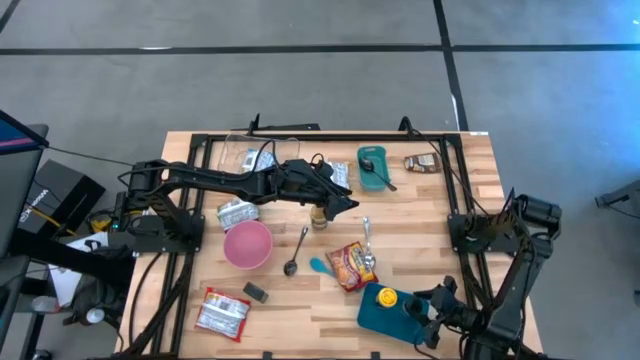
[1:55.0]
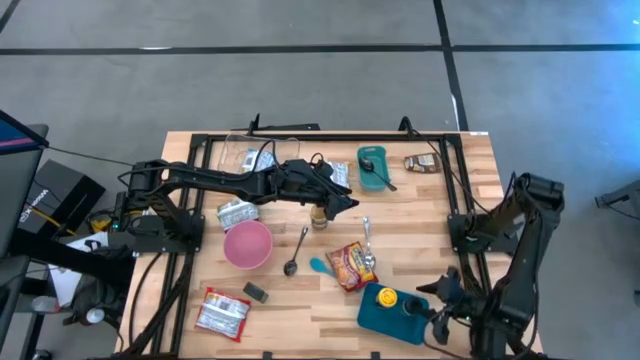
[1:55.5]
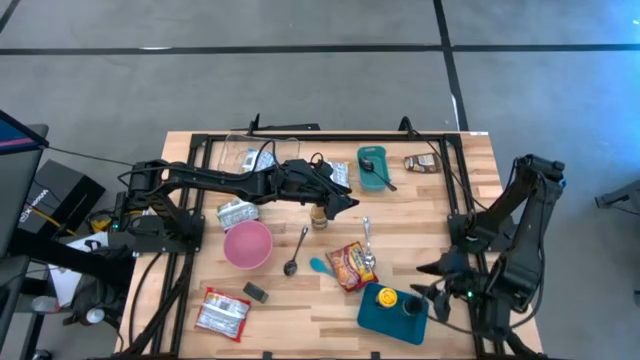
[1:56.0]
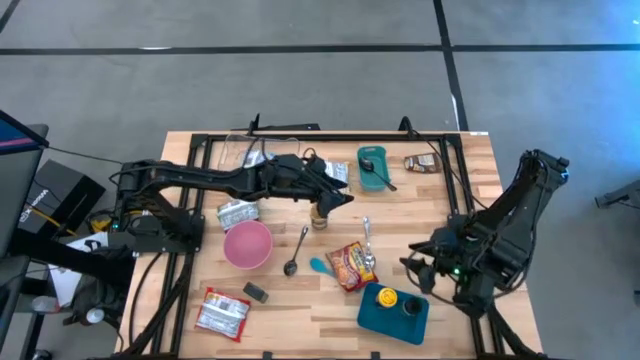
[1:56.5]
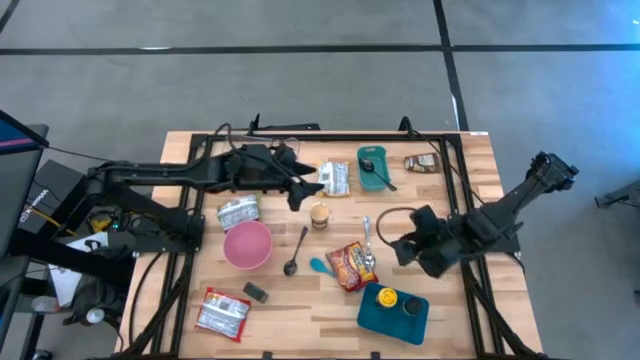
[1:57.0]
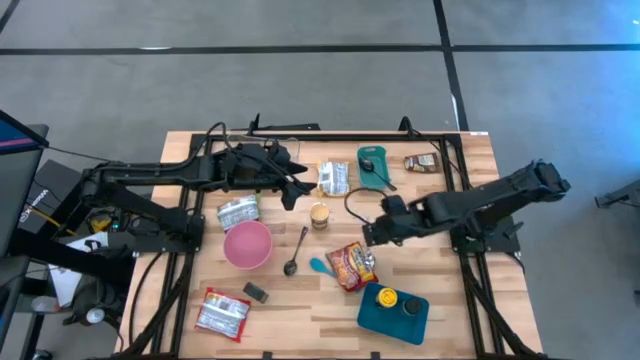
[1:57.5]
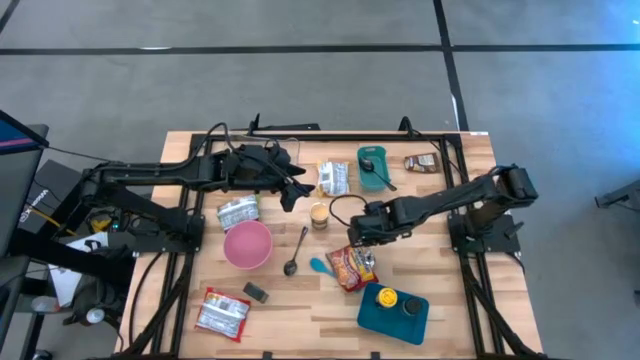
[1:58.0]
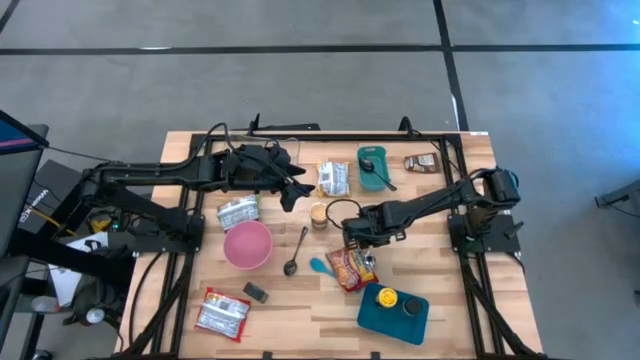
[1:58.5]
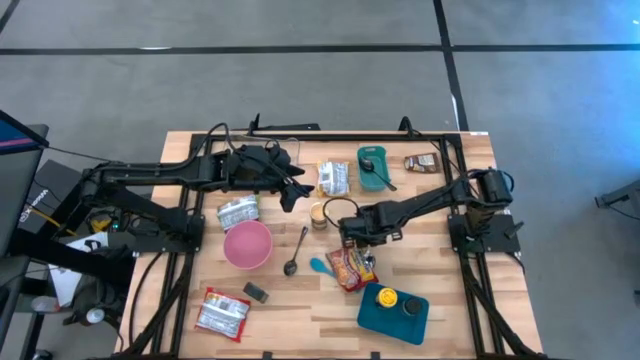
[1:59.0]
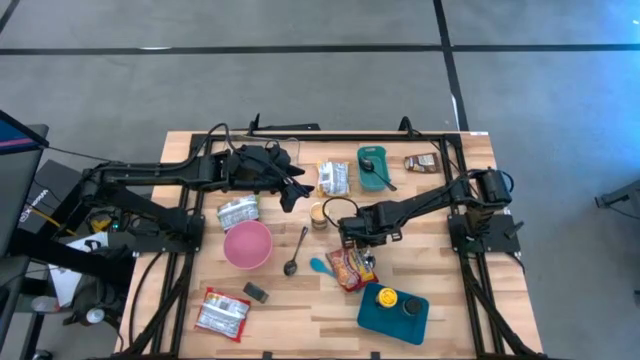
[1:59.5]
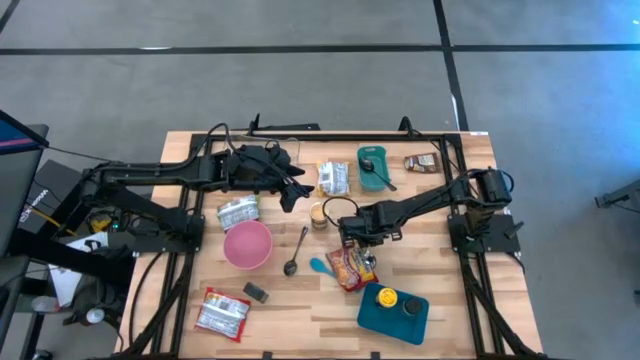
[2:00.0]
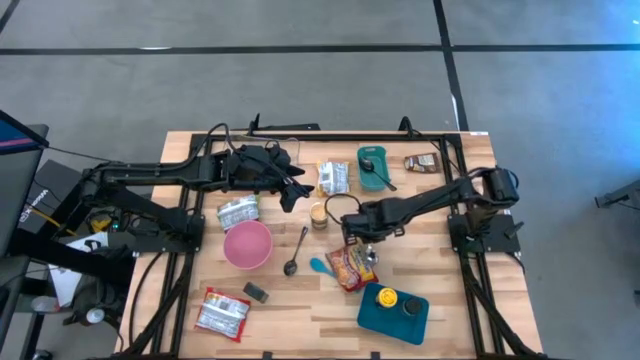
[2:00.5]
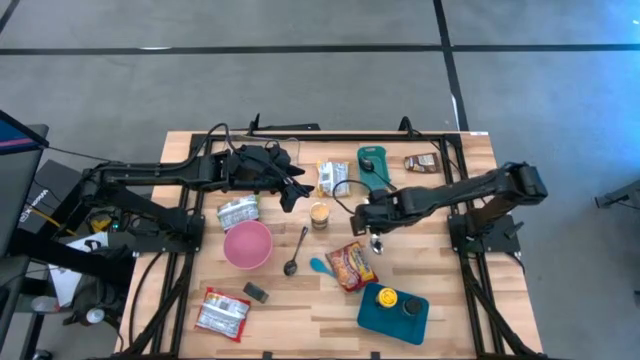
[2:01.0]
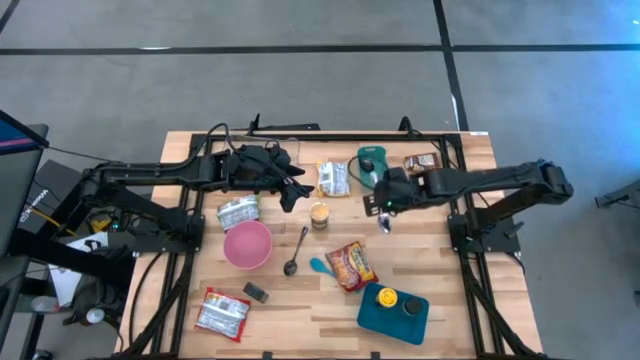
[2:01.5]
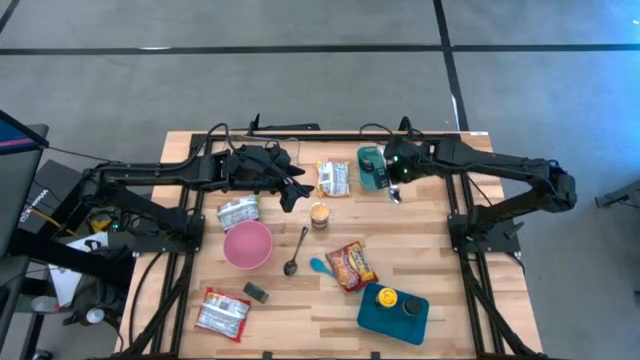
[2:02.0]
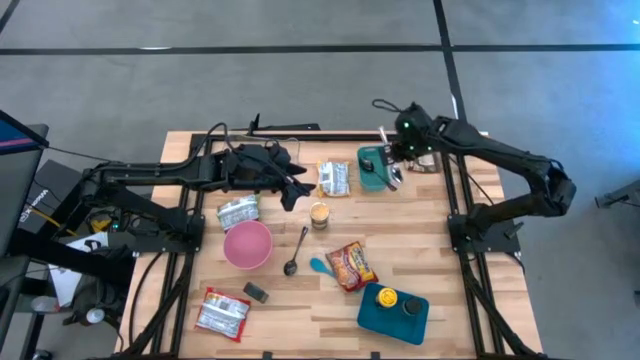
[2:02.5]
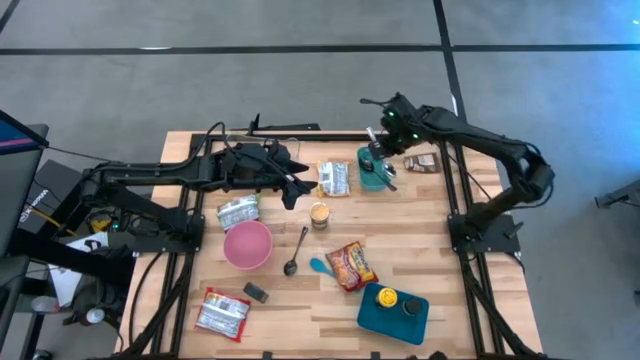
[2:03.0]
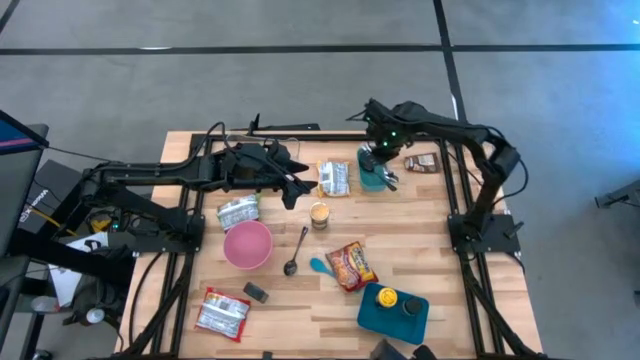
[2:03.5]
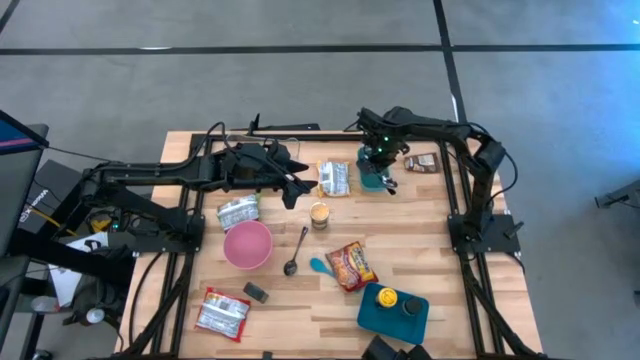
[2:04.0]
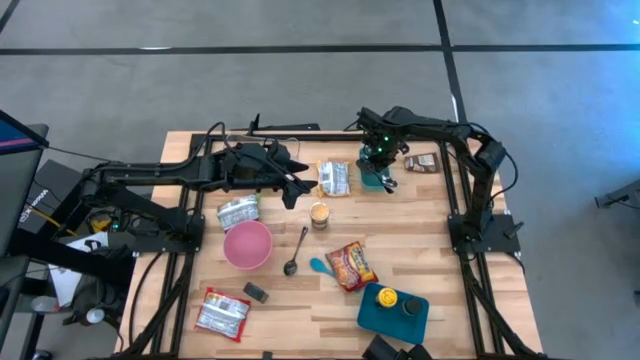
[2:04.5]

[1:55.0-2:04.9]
Task: Pick & Place Food Item
Put the silver spoon into the green bin

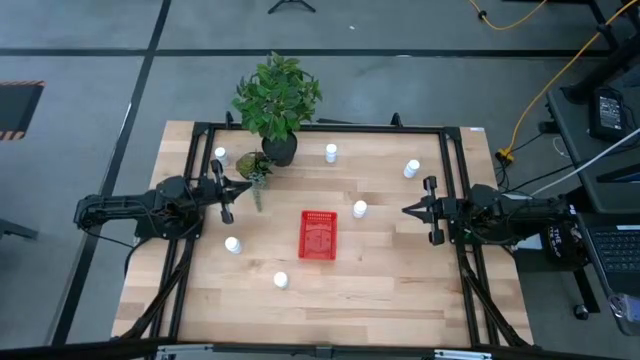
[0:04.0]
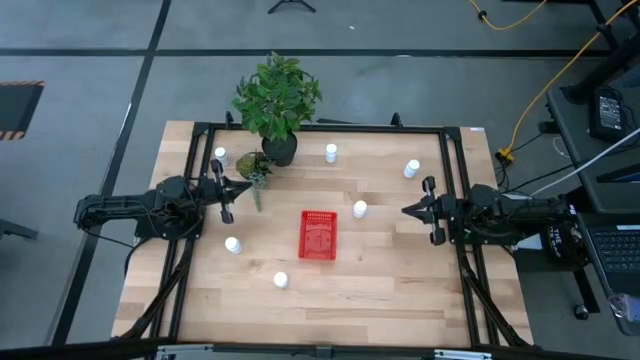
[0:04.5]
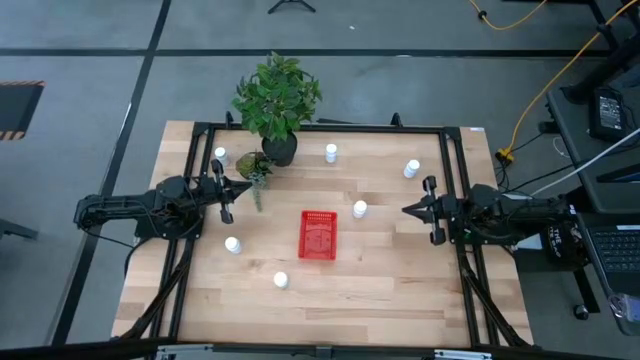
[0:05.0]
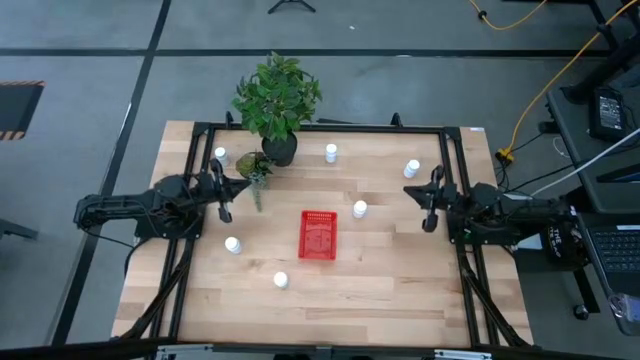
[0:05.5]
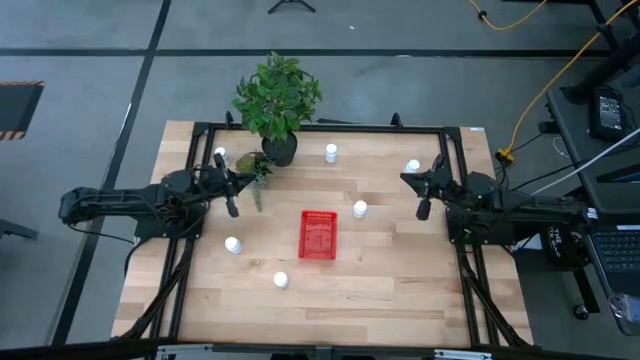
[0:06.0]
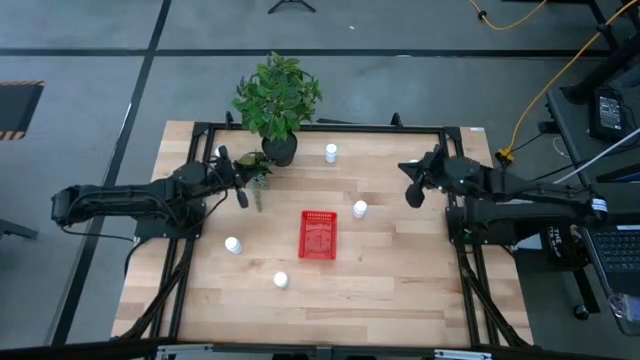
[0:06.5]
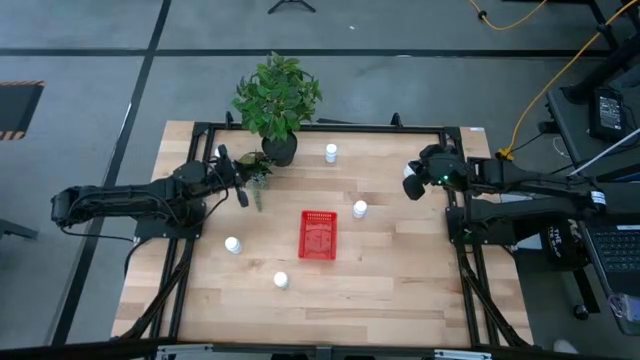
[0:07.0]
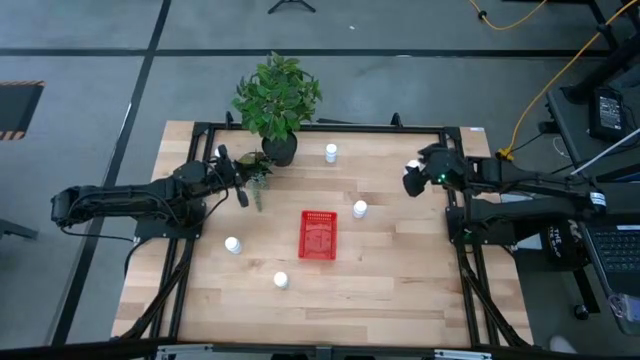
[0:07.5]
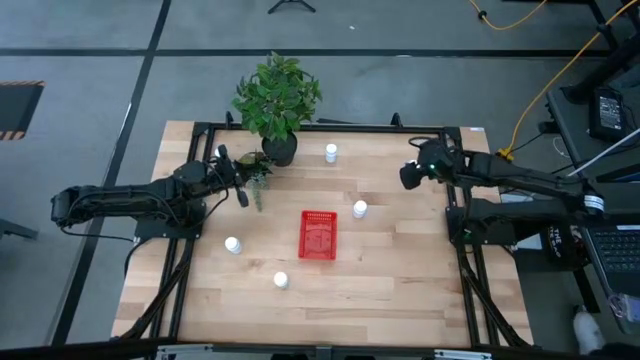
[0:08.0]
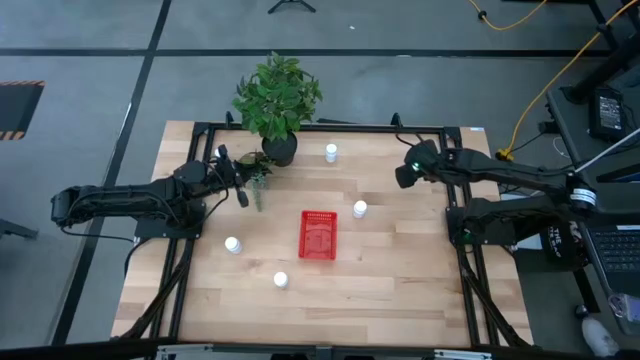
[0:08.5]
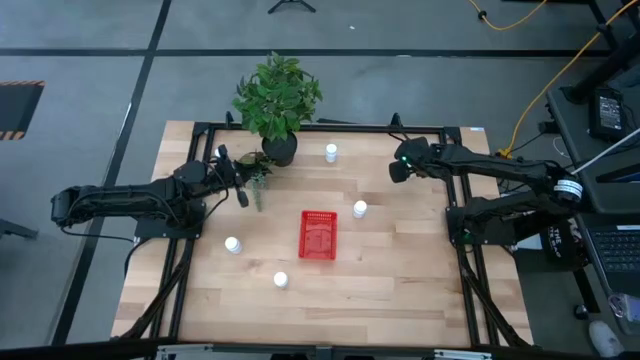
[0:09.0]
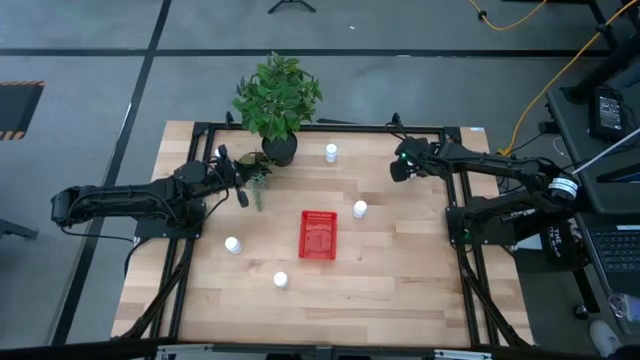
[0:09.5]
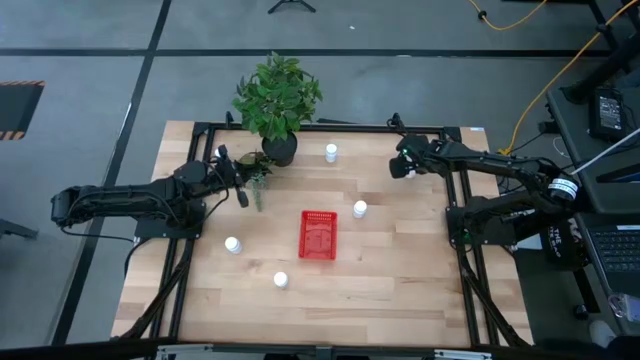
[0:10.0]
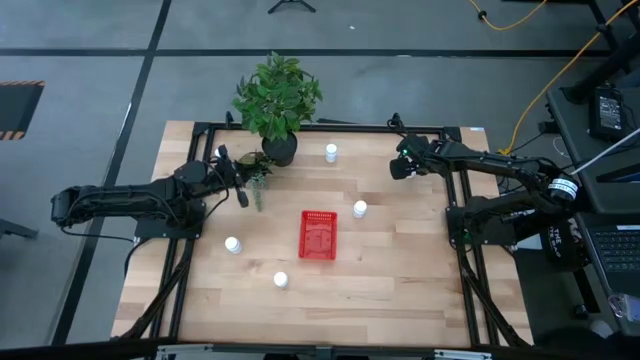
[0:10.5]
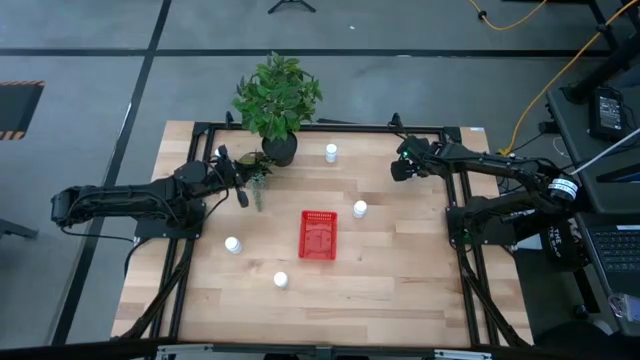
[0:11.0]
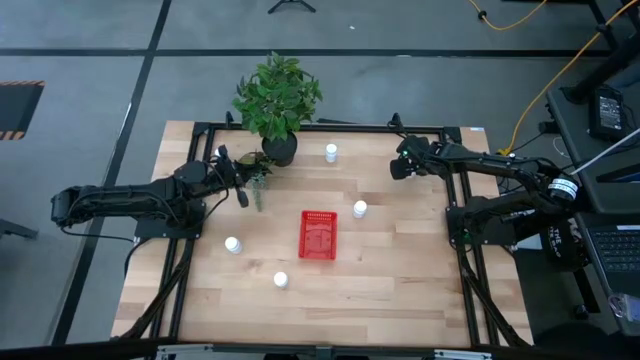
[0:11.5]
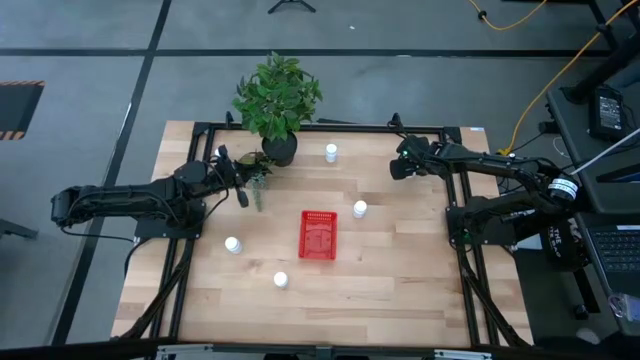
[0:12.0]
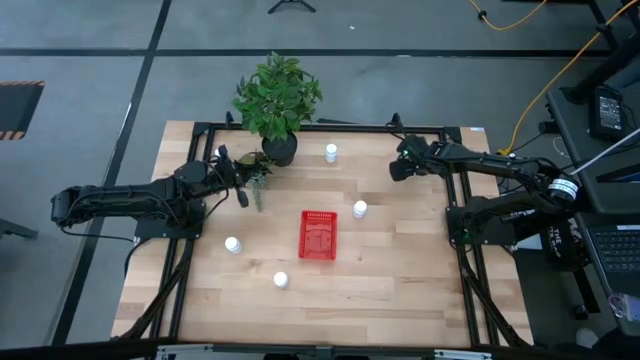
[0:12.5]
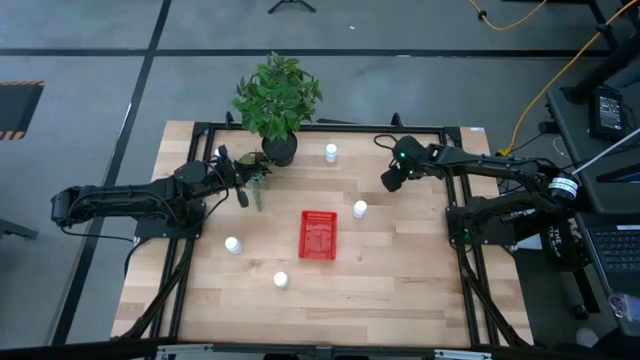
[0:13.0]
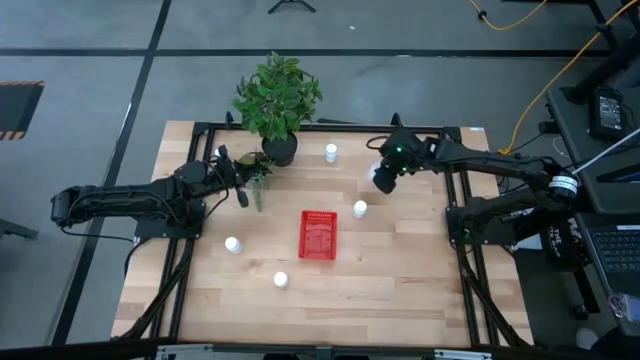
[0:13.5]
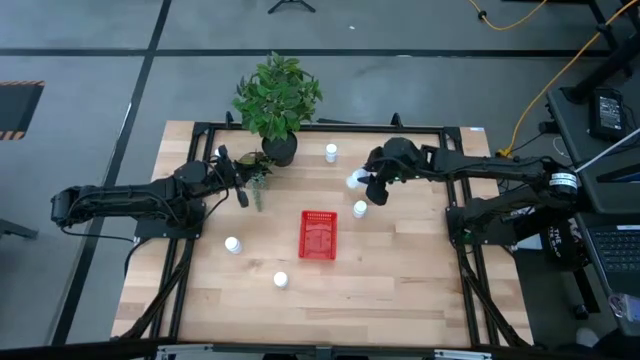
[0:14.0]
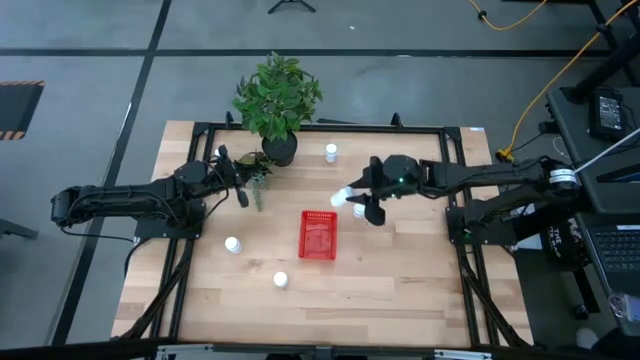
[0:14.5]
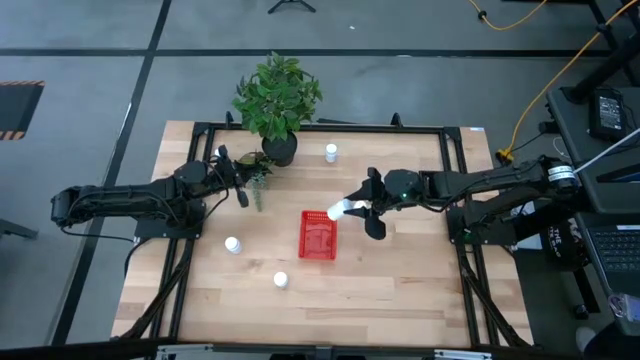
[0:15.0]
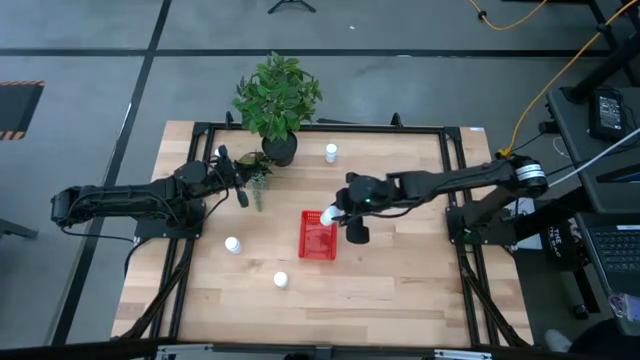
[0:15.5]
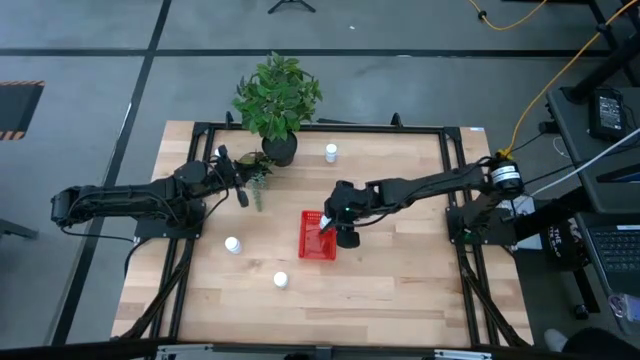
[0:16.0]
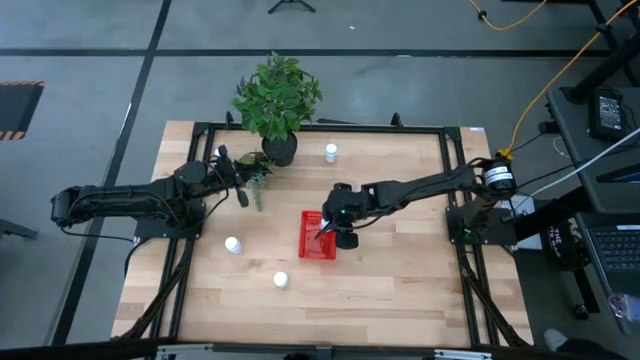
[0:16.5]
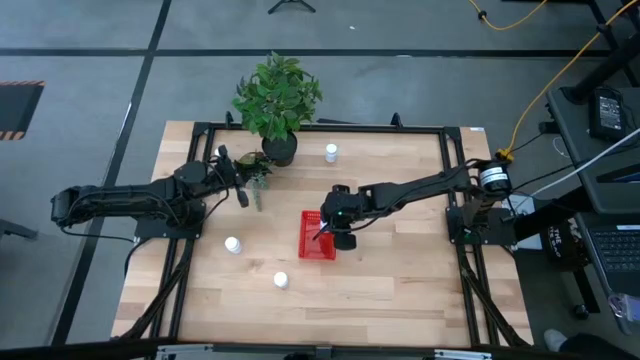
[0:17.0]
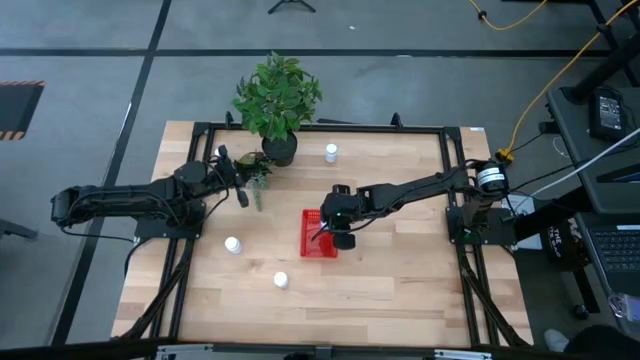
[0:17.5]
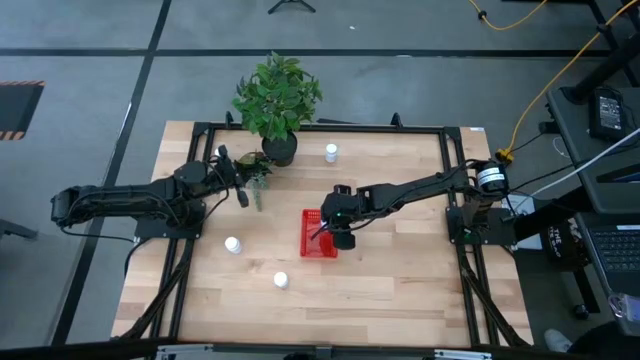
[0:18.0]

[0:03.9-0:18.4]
Task: Pick and place pill bottles into a basket
Put the white medicine bottle into the red bin
